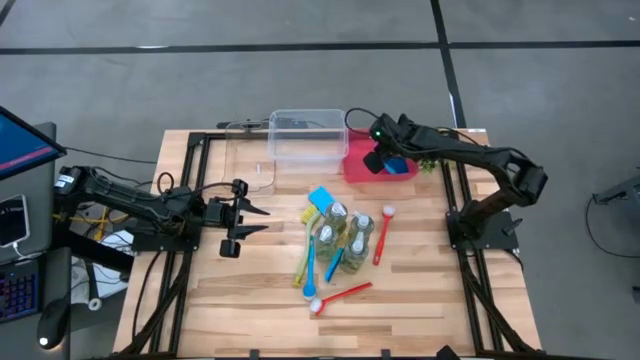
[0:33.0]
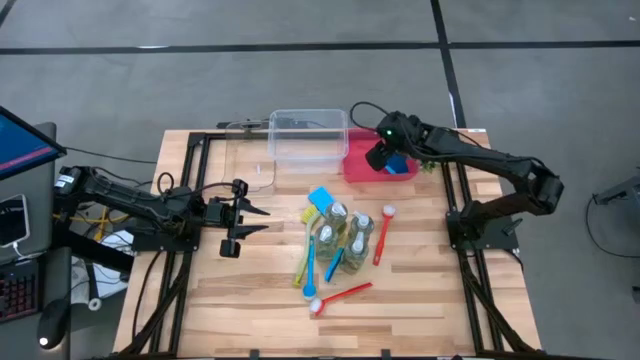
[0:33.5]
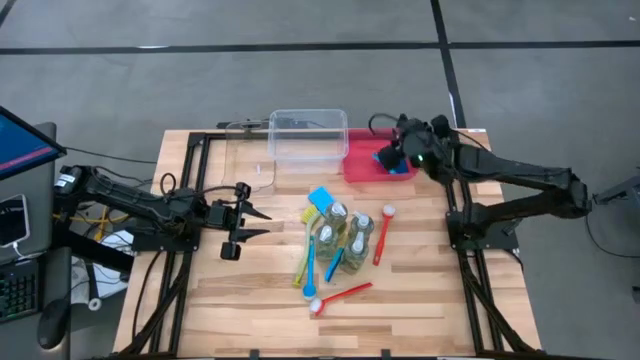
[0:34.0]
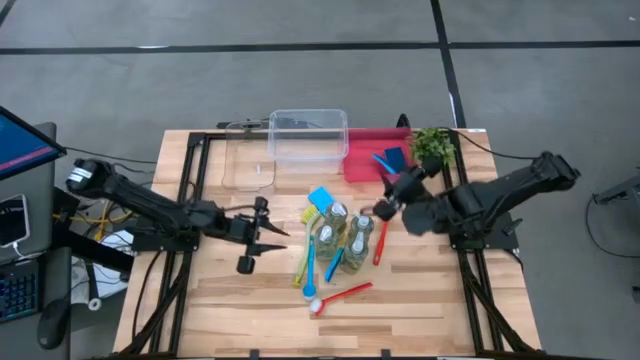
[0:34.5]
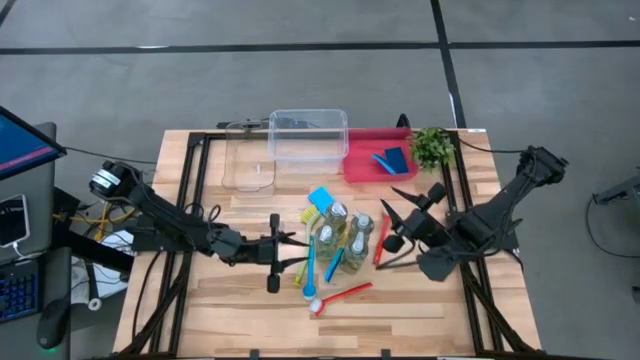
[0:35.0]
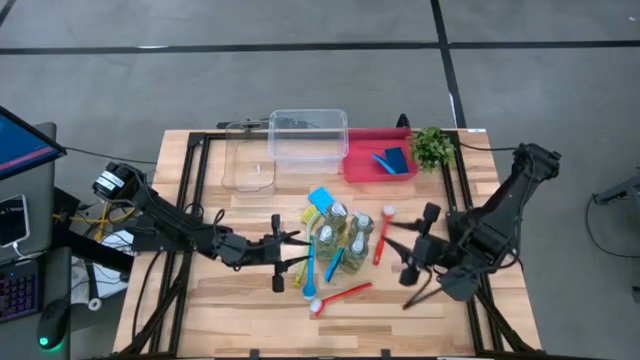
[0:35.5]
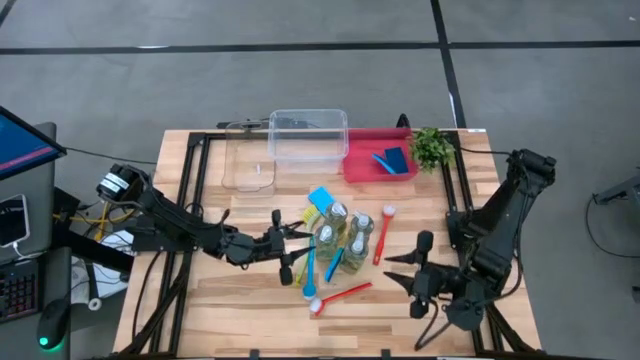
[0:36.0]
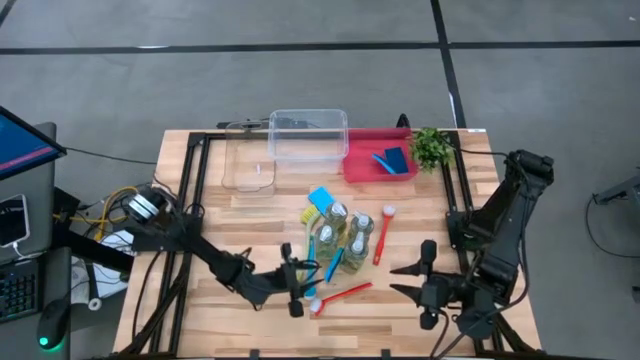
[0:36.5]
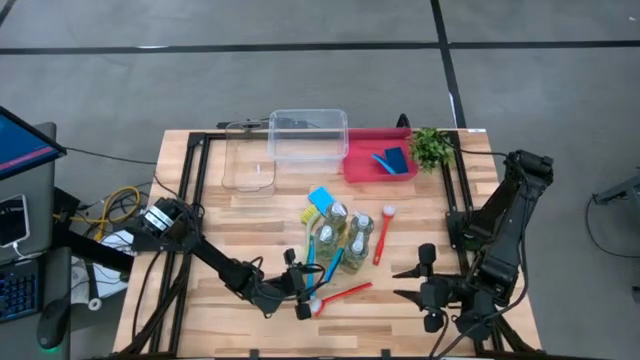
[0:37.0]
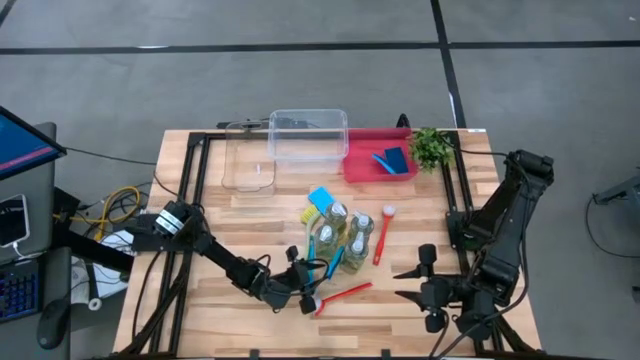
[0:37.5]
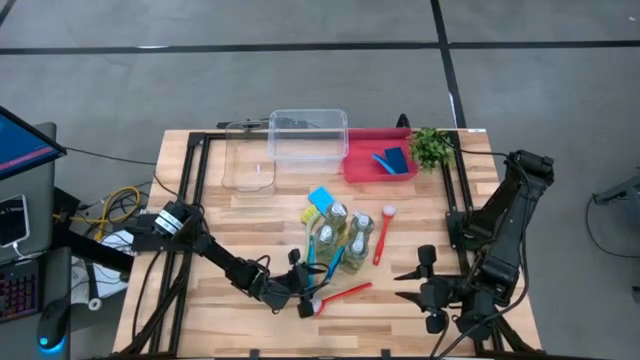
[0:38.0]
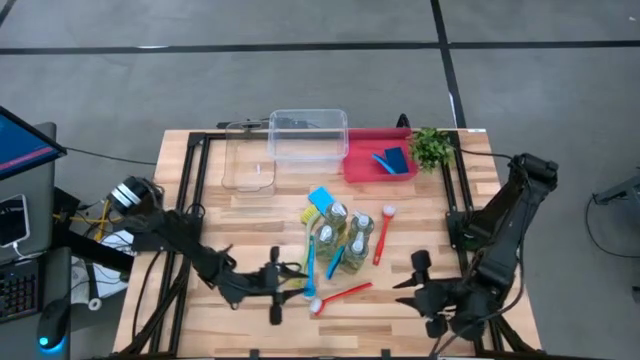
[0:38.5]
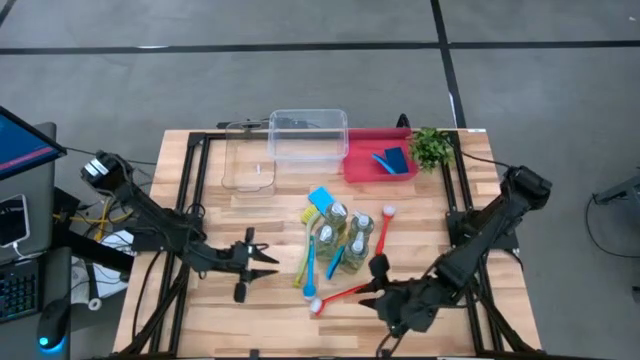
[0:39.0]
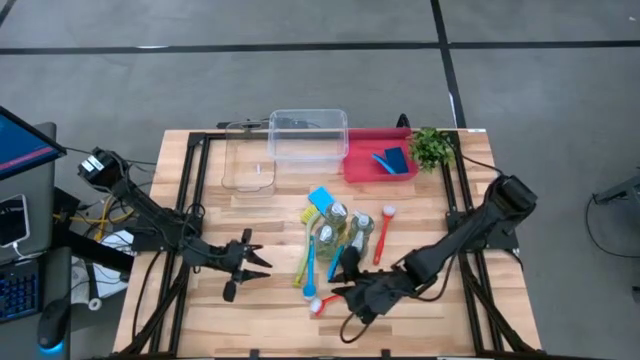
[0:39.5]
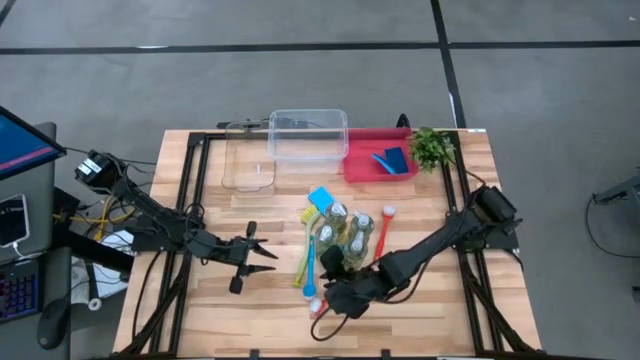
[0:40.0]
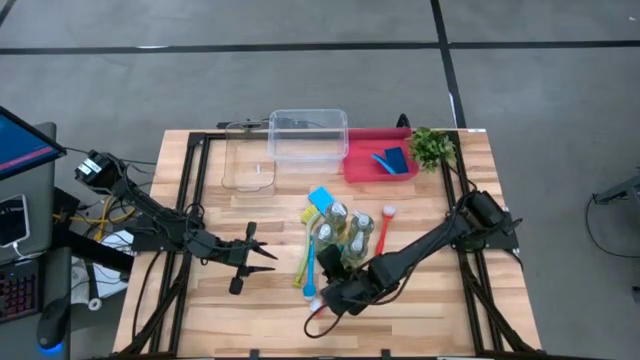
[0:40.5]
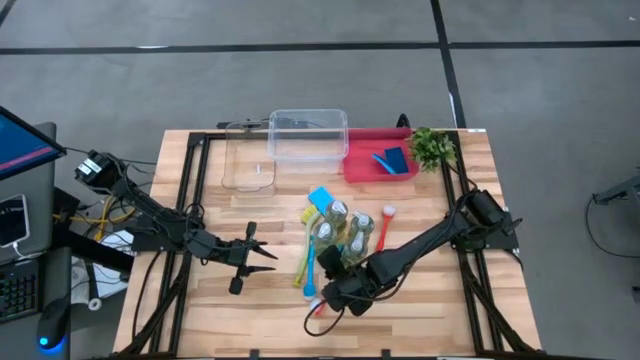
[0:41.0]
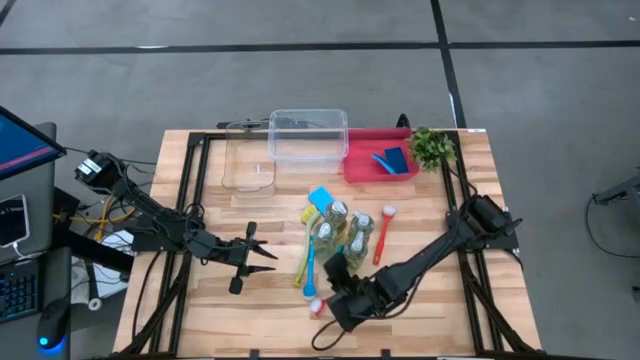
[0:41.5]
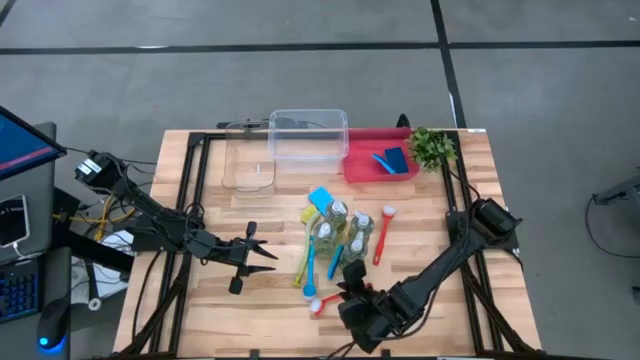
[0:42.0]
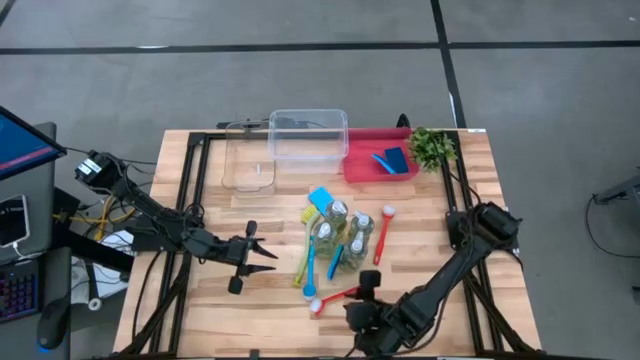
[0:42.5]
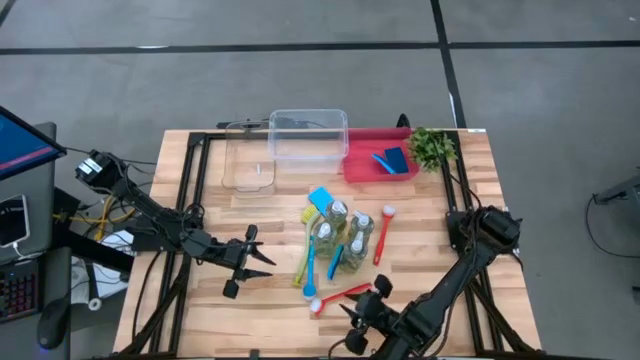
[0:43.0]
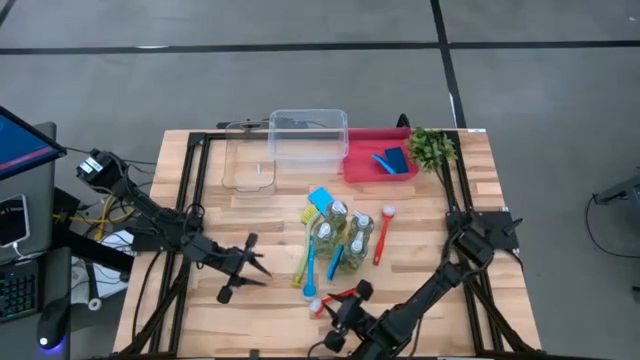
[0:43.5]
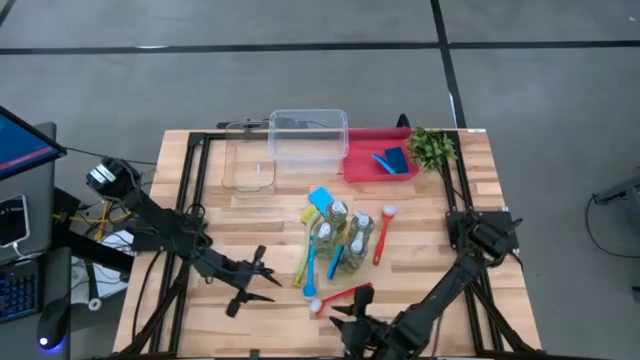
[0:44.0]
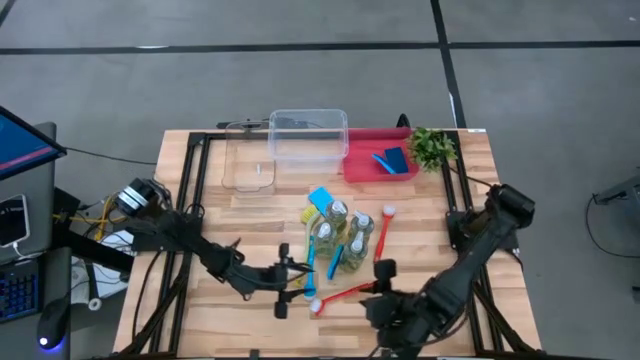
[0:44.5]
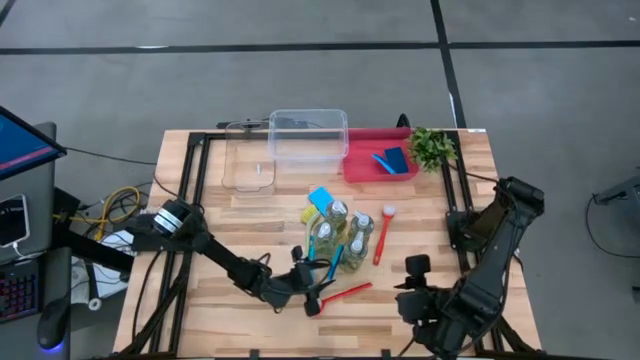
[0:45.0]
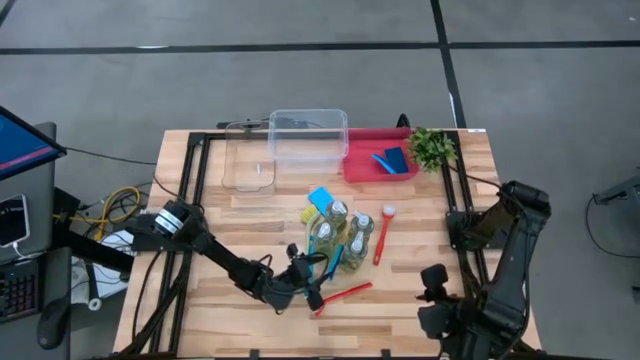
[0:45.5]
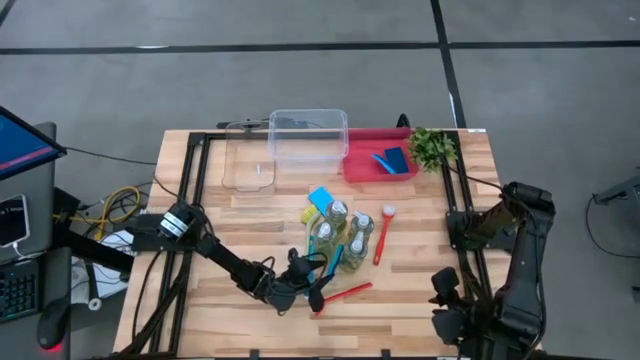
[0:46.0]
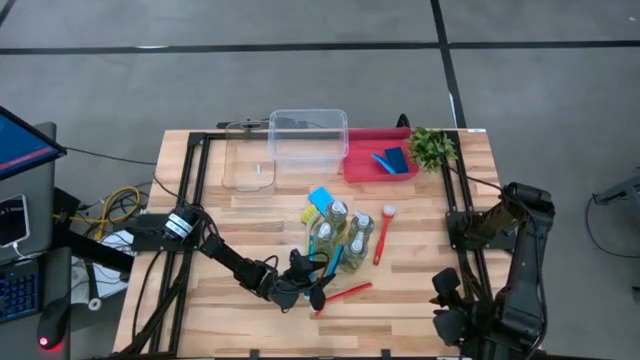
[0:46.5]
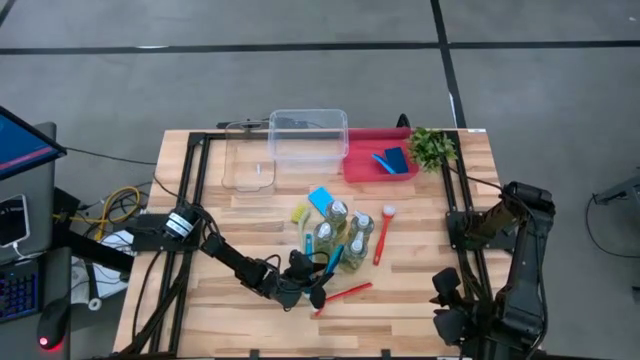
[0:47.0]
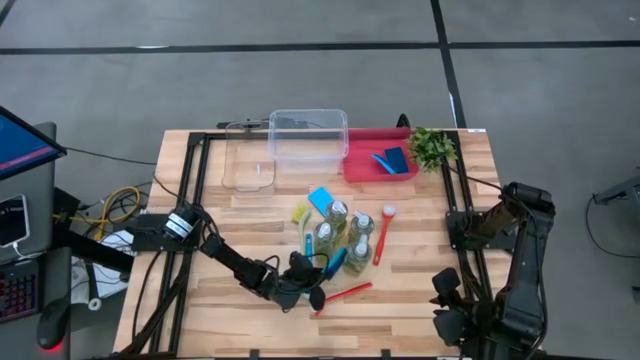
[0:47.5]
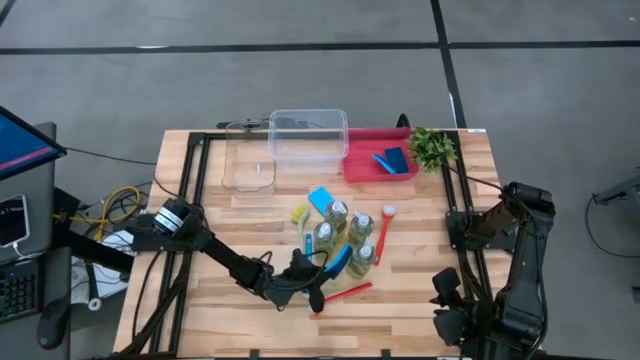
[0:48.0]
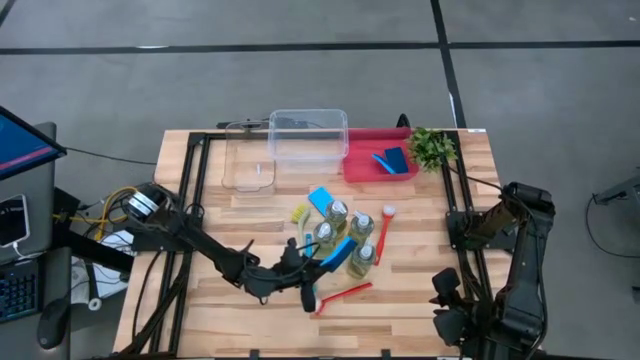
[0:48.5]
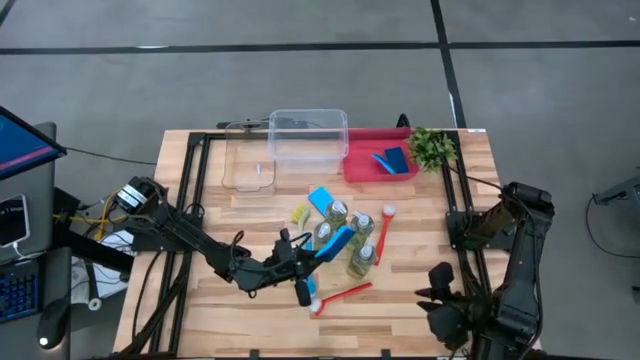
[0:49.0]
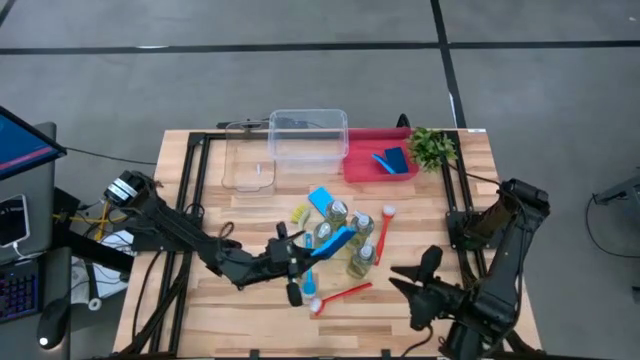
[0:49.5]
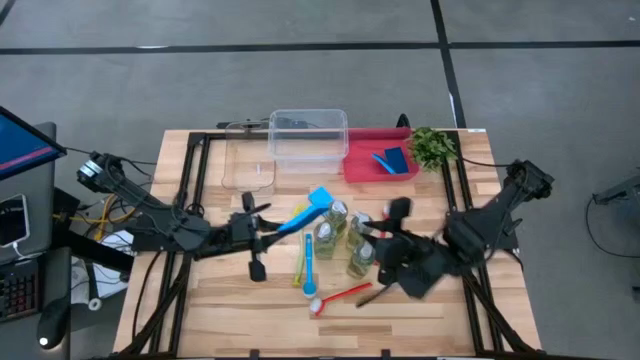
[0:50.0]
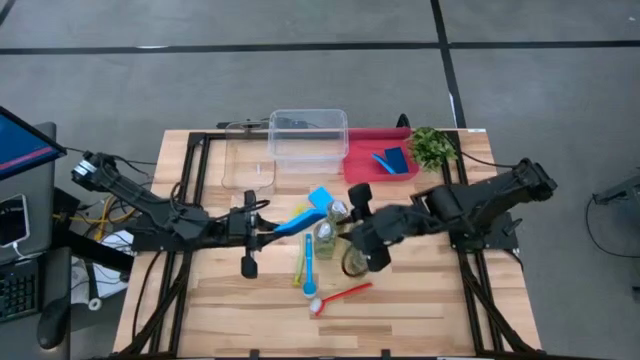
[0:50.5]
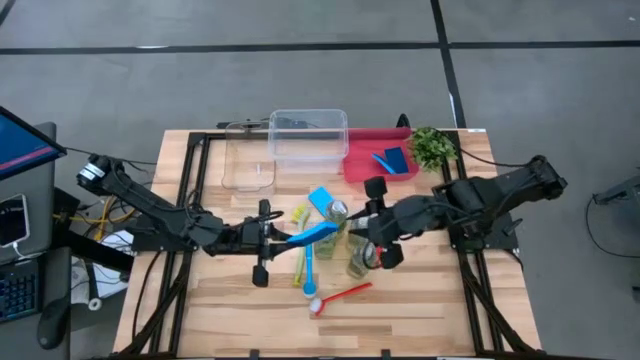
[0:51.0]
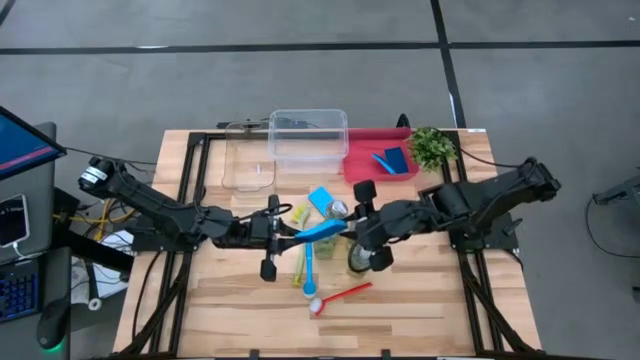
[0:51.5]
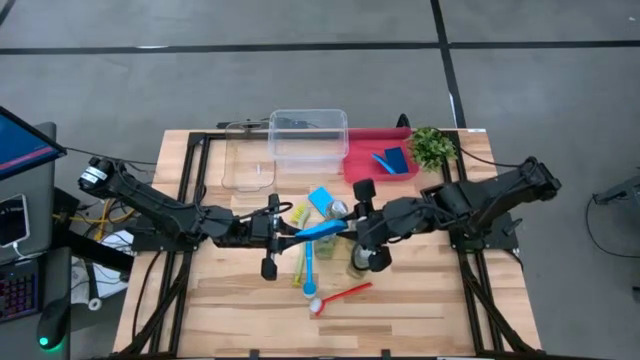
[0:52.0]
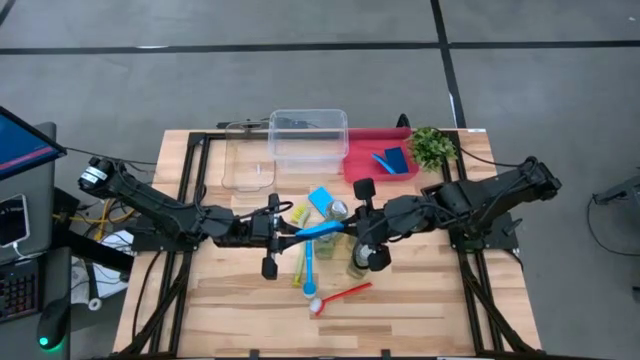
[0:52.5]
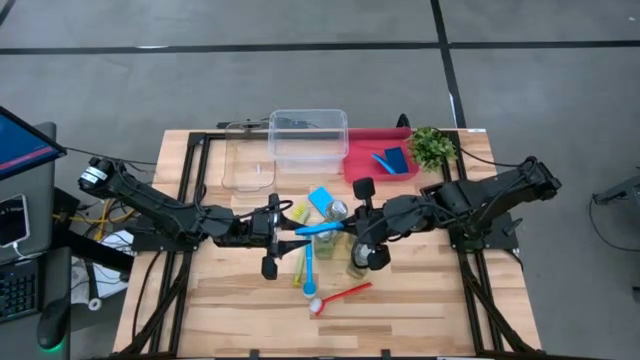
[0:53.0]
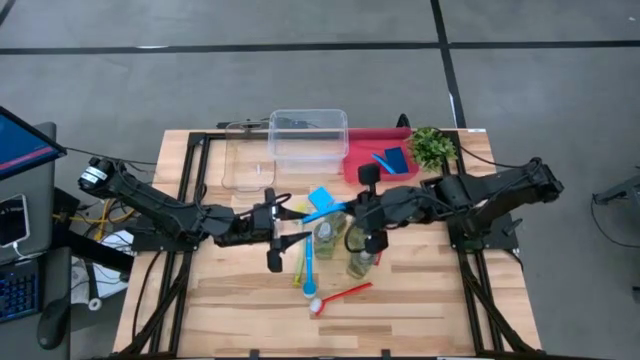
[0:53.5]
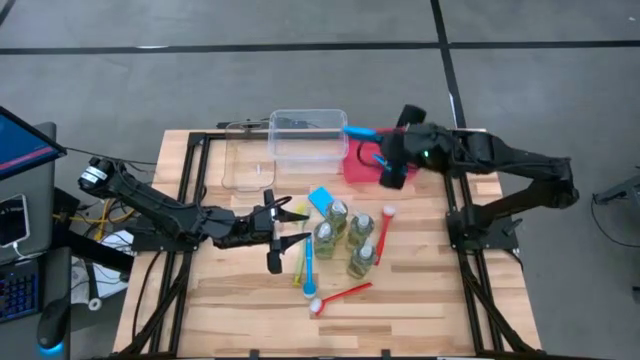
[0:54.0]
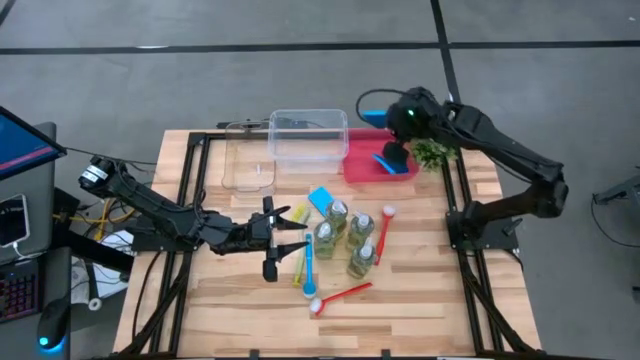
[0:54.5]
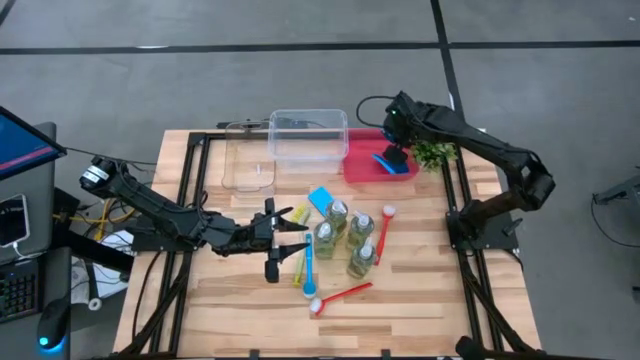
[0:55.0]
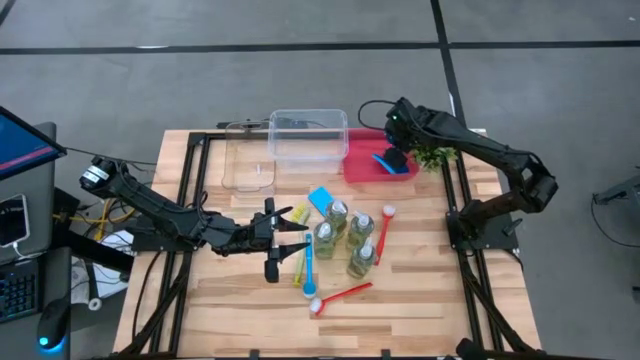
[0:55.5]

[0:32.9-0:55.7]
Task: Pick & Place Kitchen Sink Supplies
Put the blue sponge into the red bin
